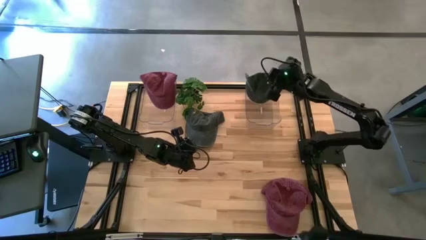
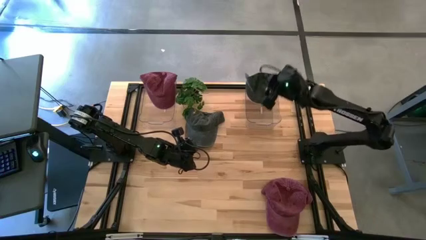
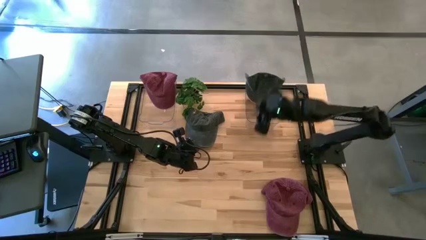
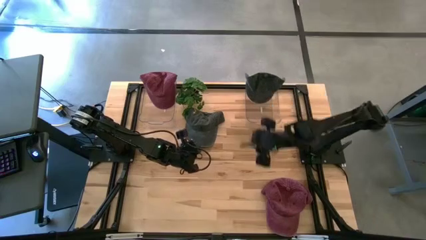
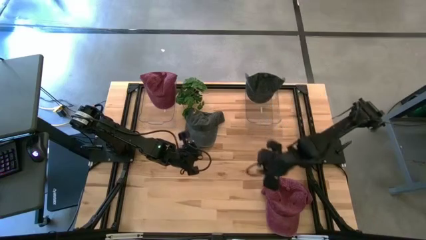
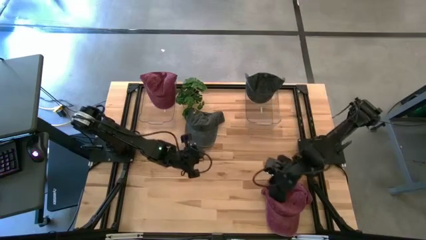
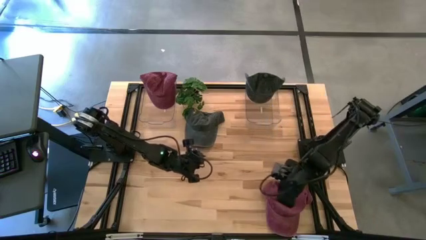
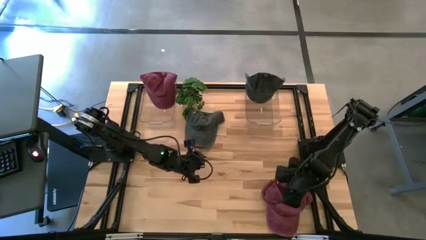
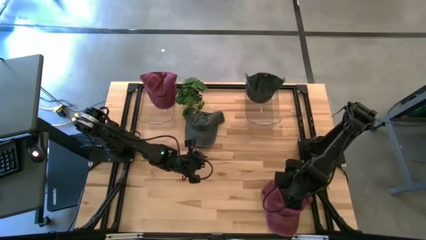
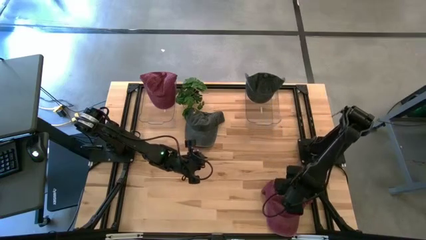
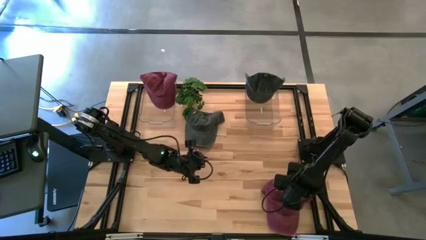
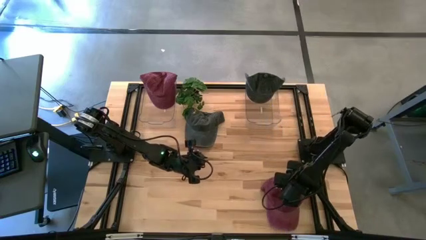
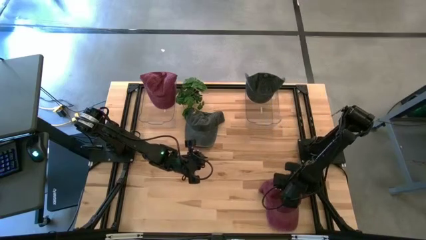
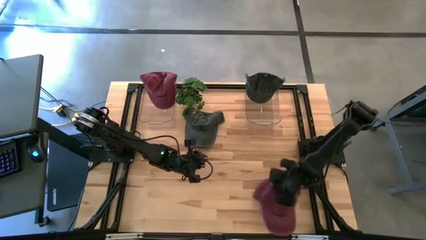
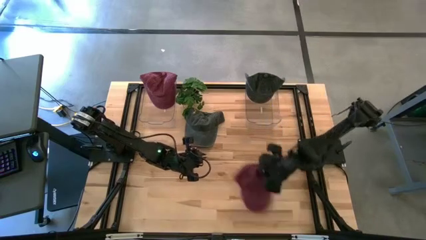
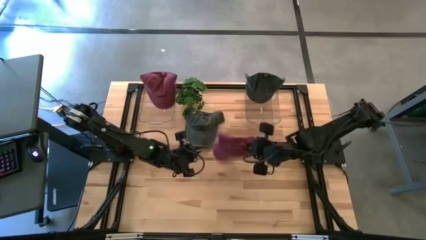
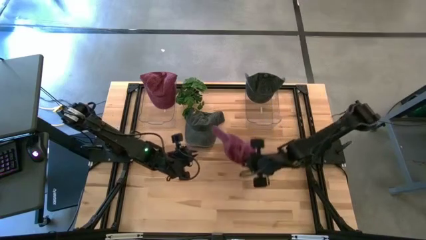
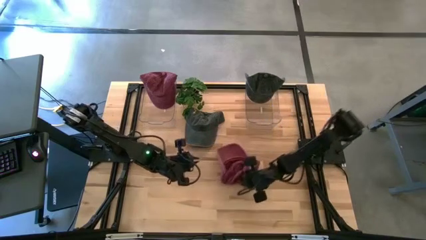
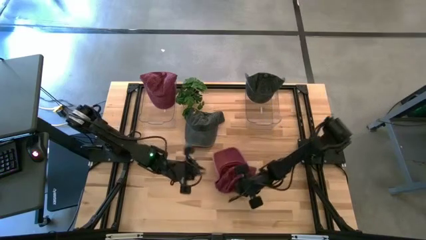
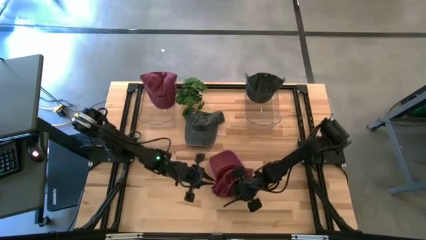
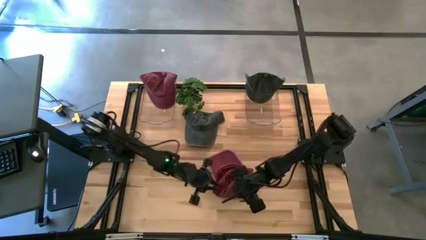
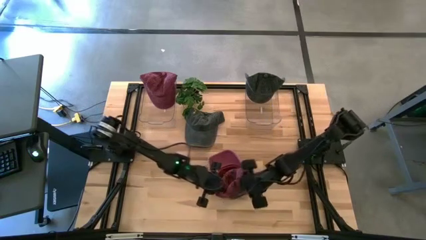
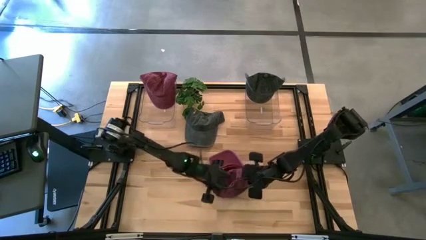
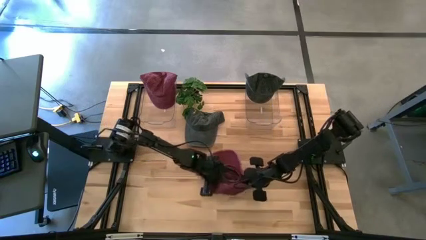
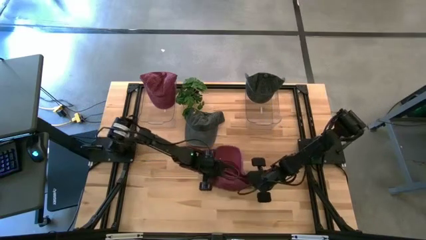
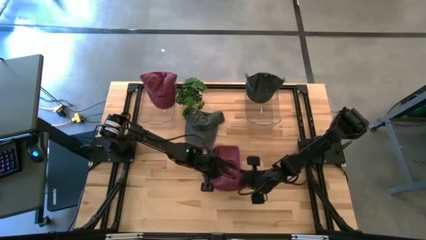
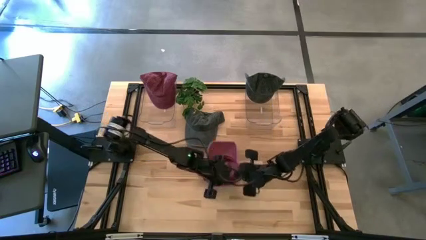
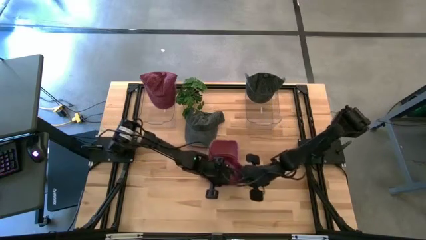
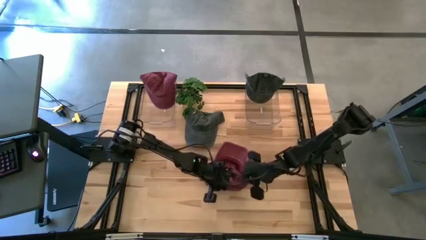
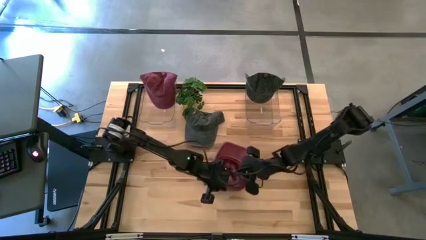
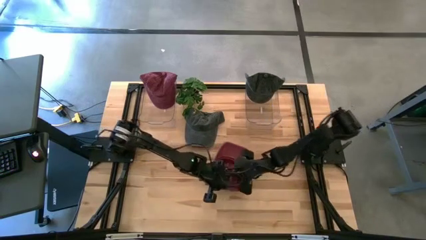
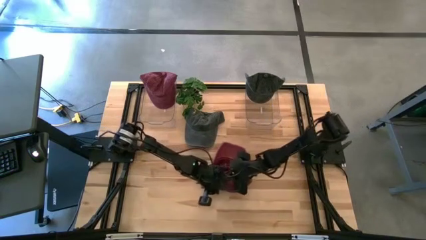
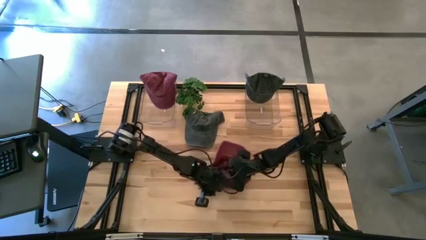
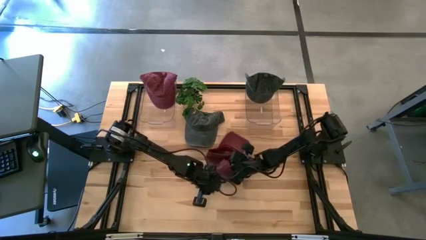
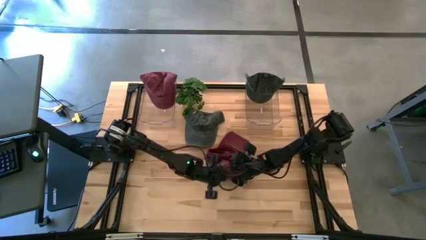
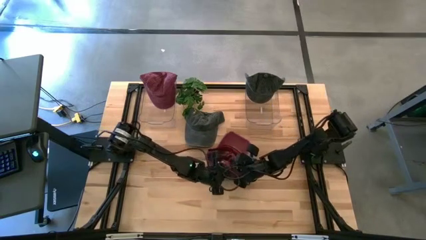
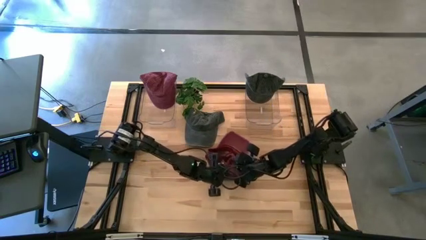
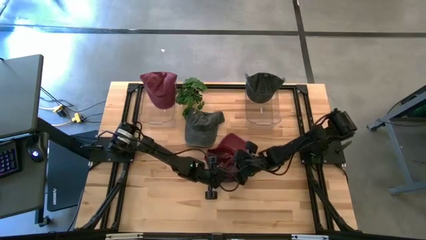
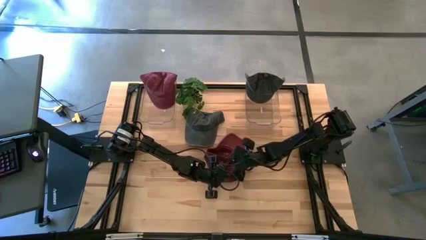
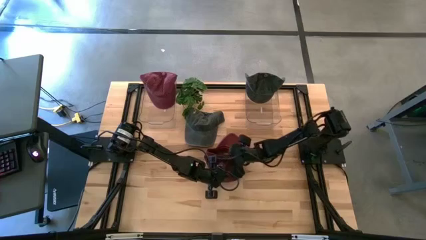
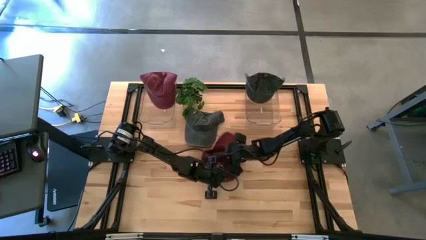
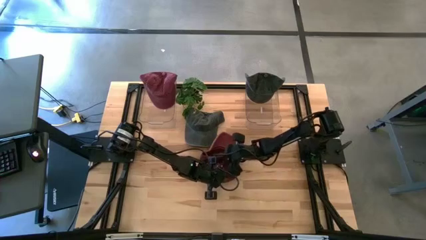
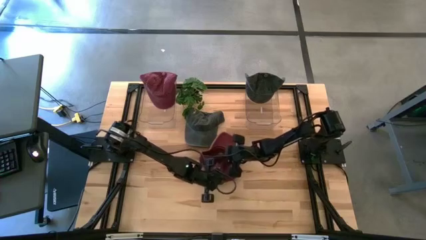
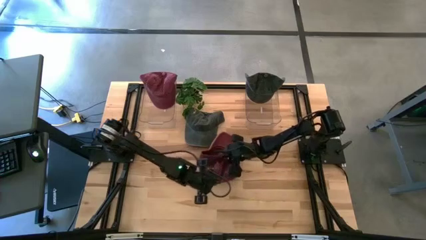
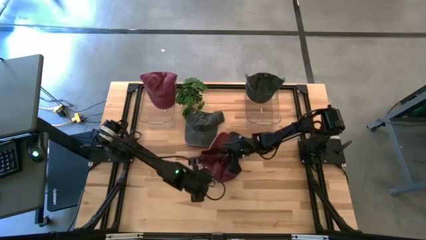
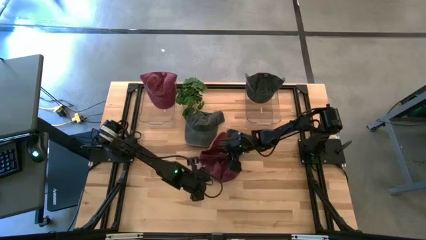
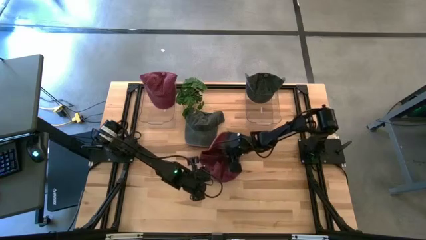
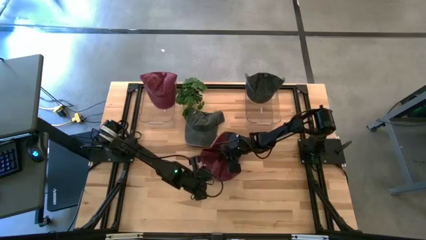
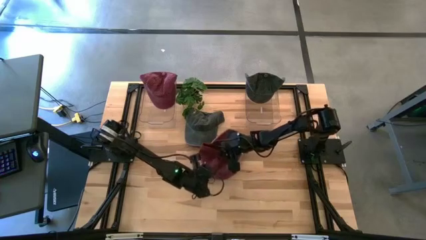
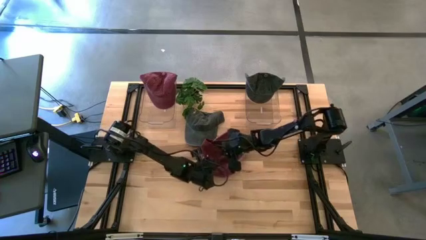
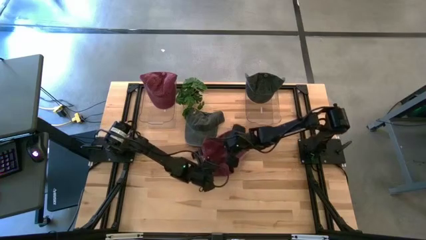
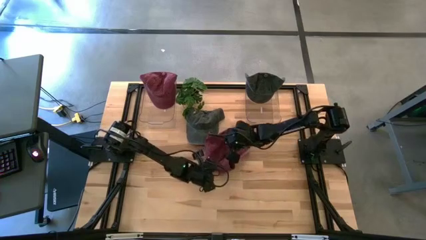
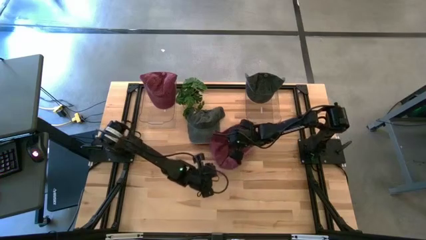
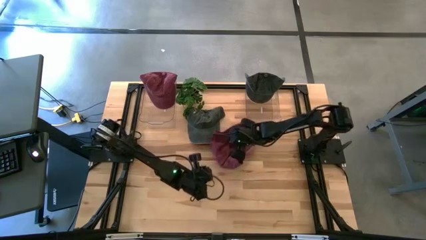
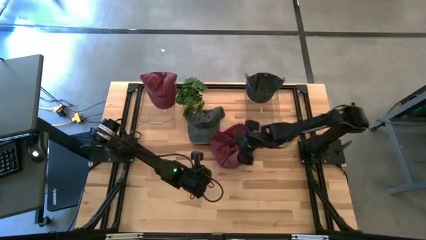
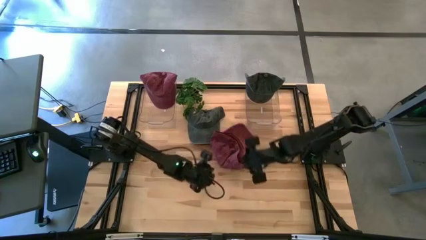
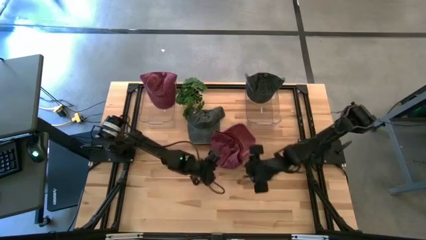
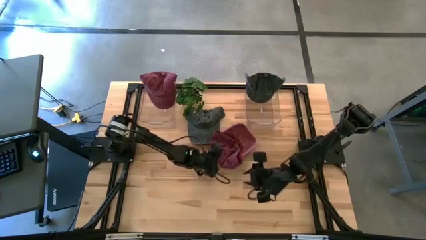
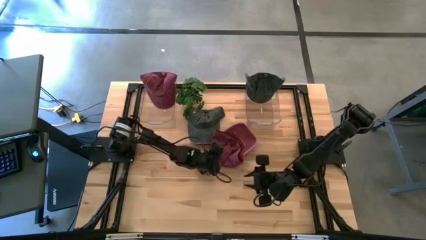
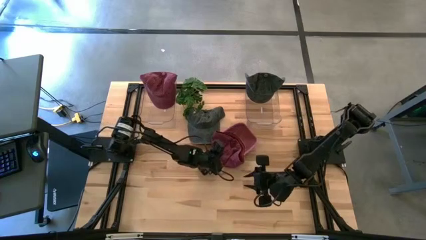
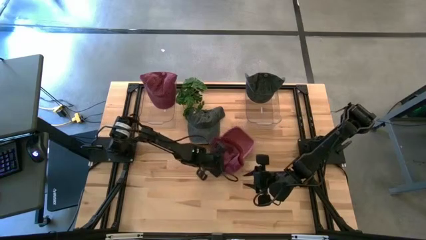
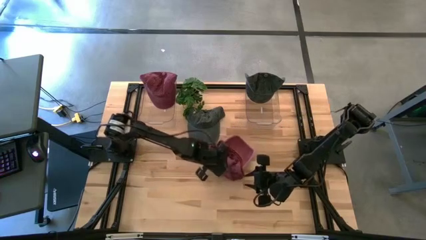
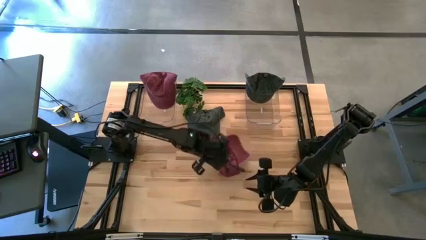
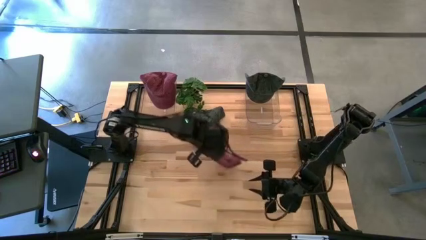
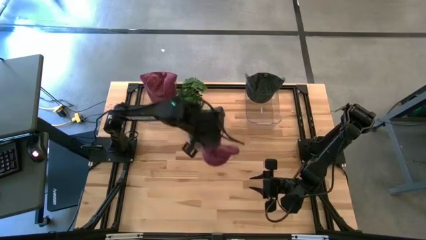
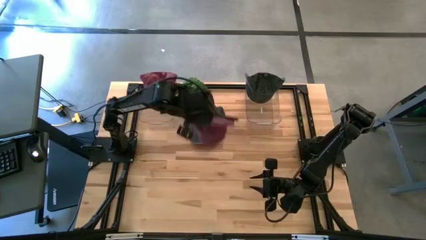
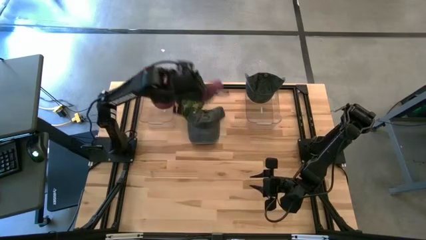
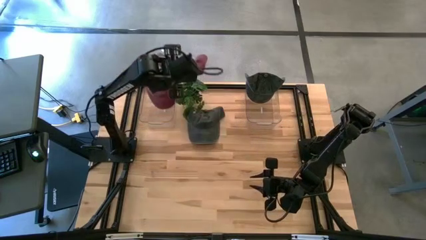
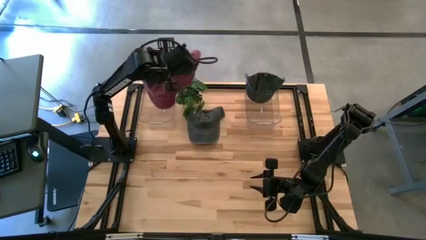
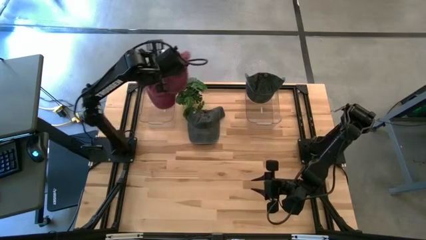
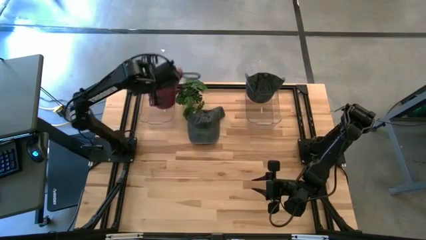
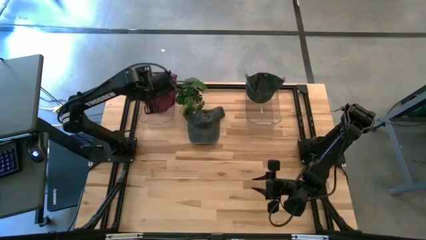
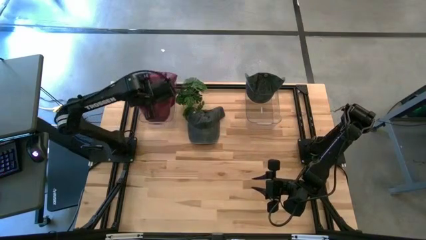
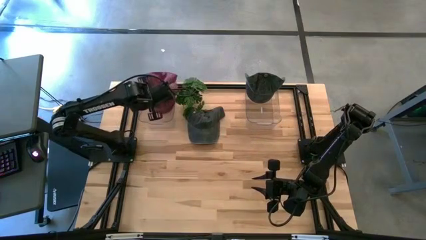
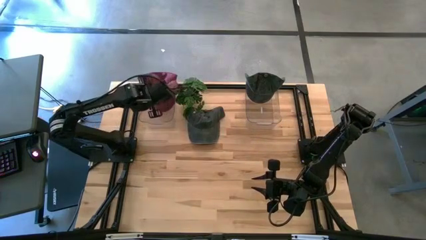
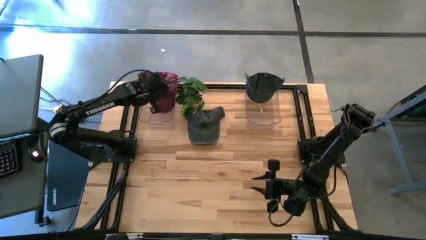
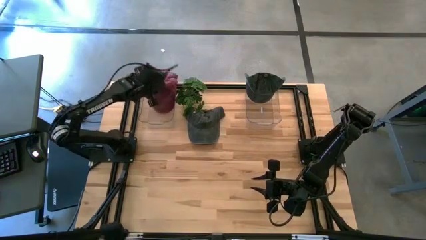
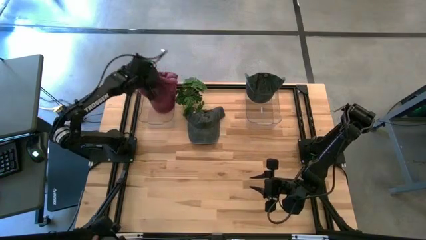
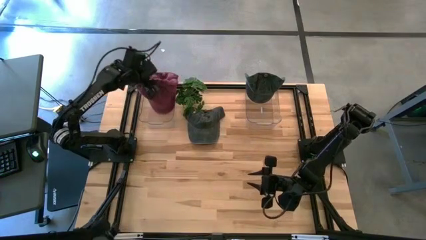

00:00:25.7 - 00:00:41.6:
Task: Pick & Place hat
Put the red cap into the left transparent bin
